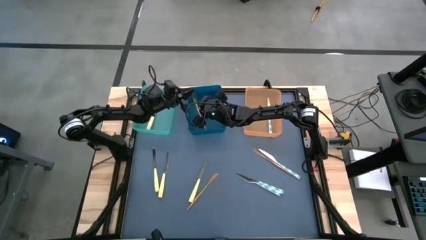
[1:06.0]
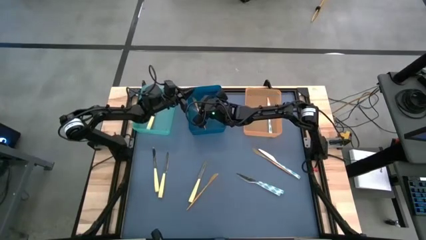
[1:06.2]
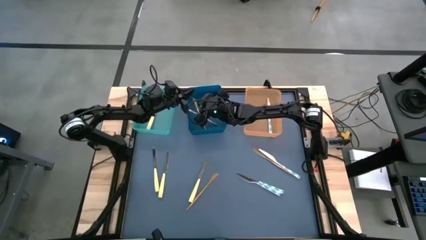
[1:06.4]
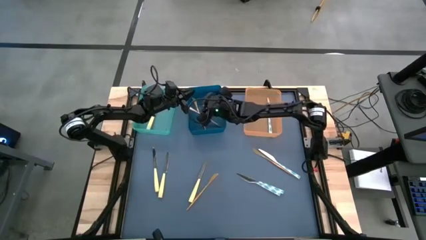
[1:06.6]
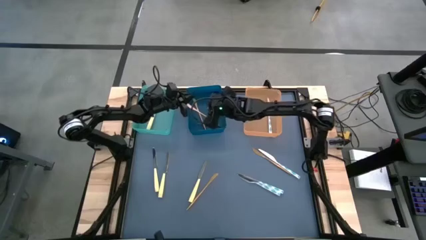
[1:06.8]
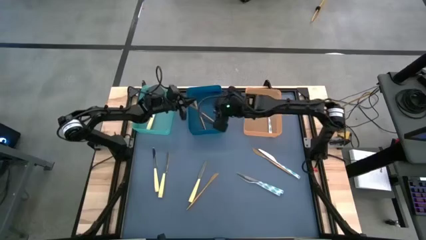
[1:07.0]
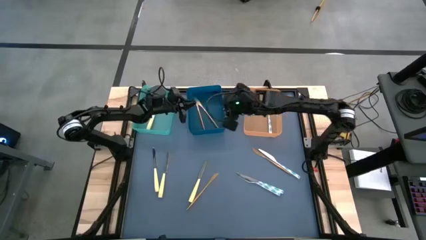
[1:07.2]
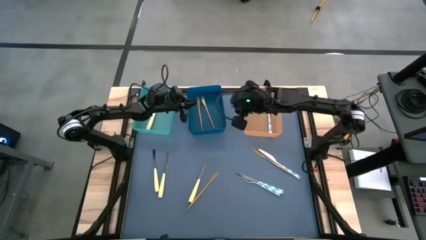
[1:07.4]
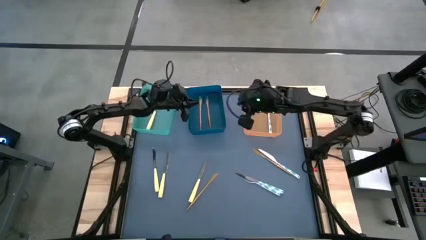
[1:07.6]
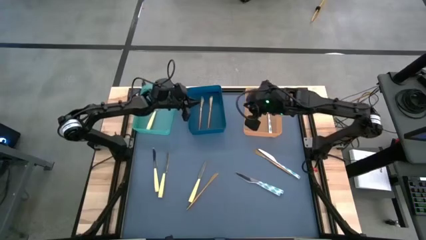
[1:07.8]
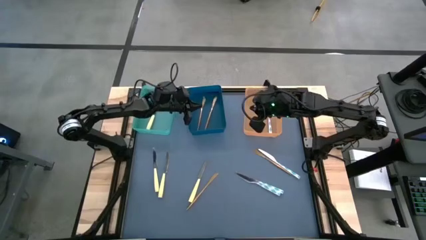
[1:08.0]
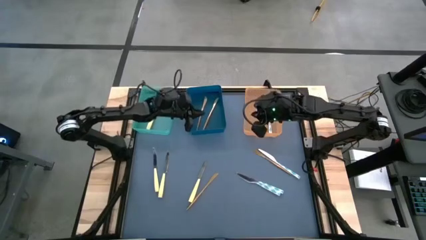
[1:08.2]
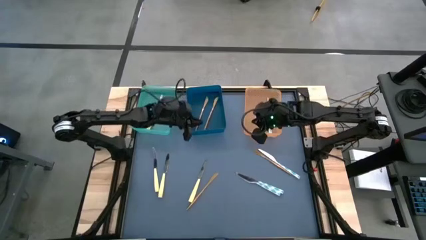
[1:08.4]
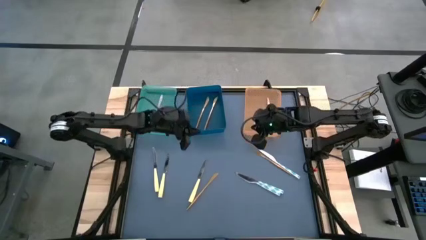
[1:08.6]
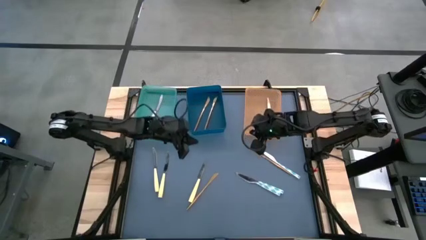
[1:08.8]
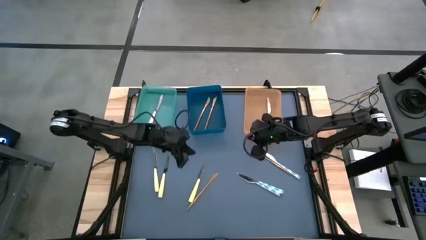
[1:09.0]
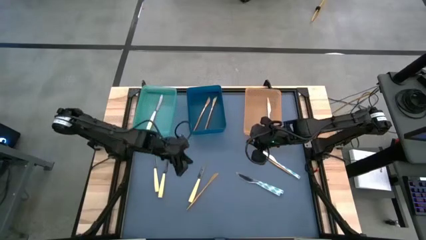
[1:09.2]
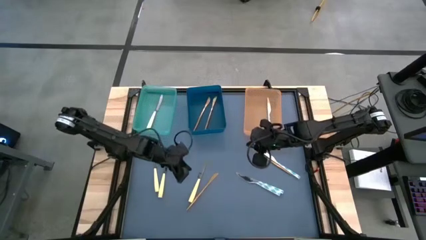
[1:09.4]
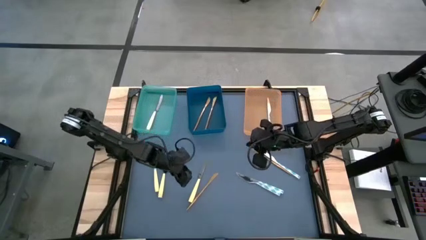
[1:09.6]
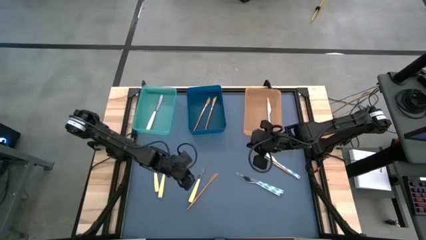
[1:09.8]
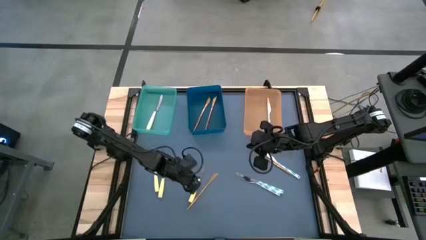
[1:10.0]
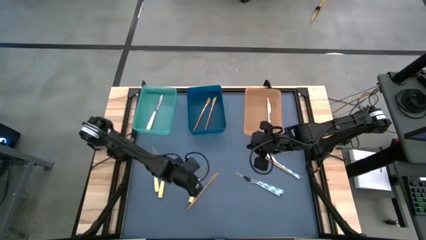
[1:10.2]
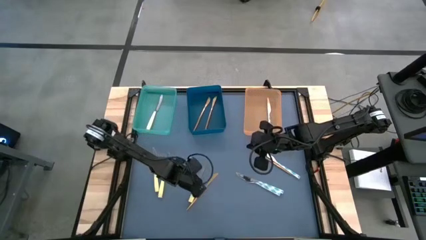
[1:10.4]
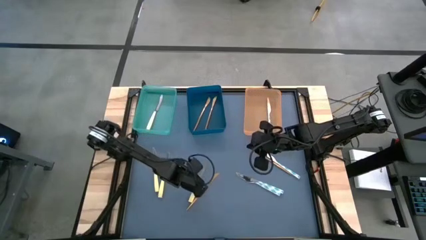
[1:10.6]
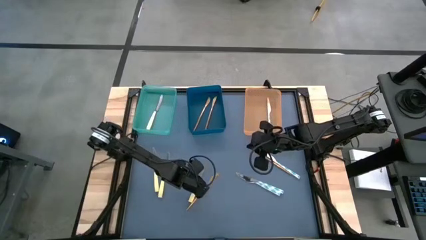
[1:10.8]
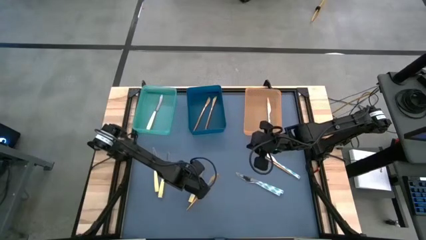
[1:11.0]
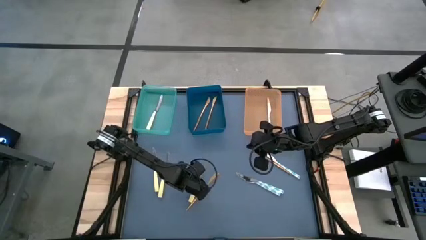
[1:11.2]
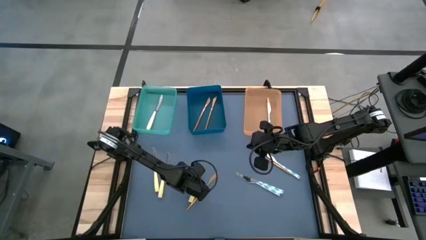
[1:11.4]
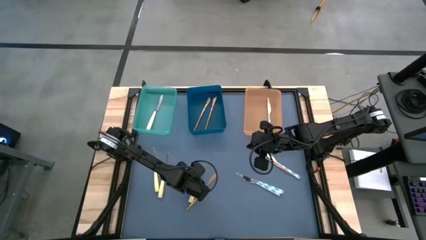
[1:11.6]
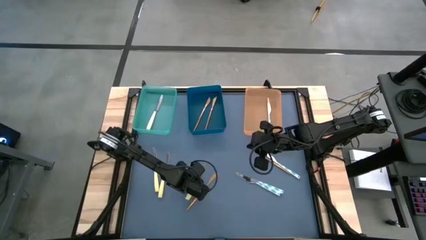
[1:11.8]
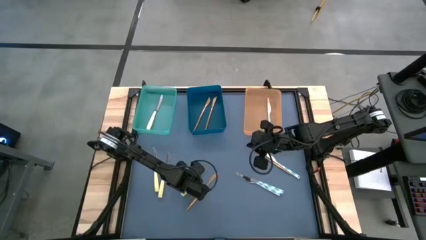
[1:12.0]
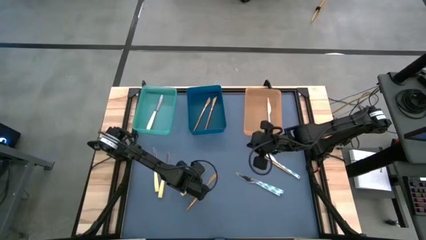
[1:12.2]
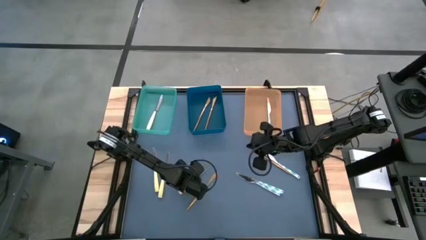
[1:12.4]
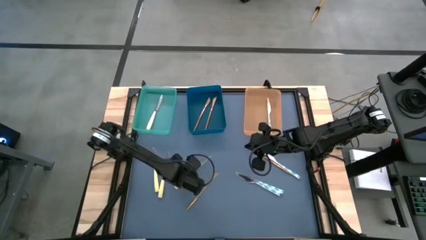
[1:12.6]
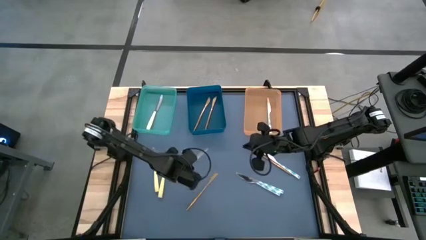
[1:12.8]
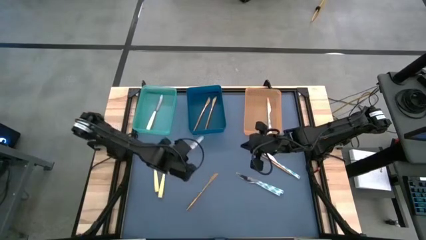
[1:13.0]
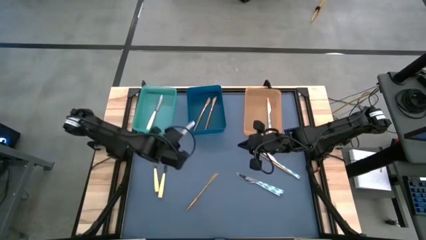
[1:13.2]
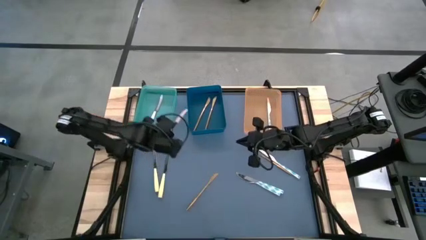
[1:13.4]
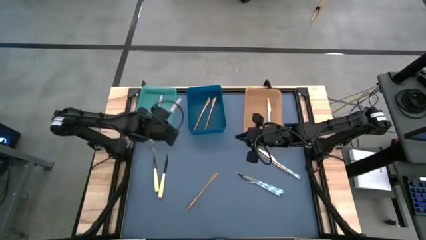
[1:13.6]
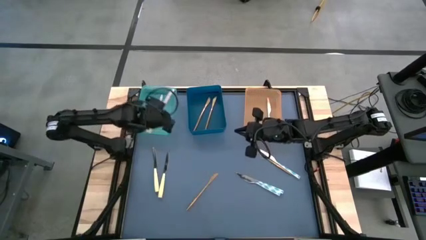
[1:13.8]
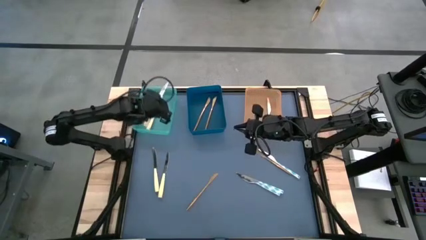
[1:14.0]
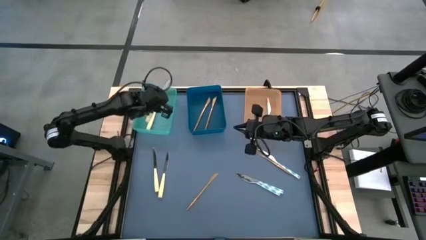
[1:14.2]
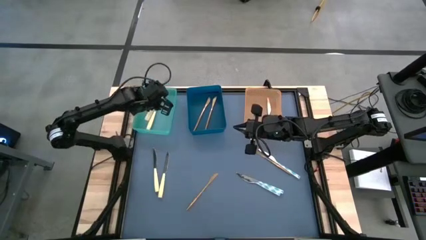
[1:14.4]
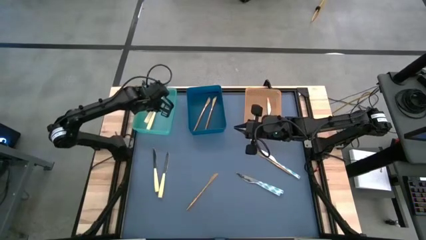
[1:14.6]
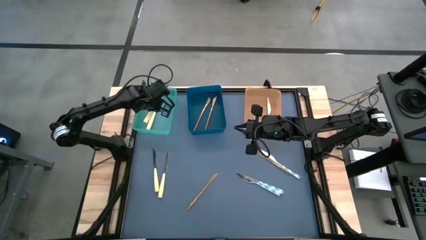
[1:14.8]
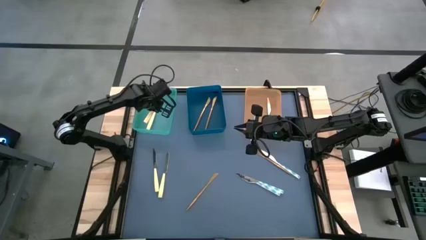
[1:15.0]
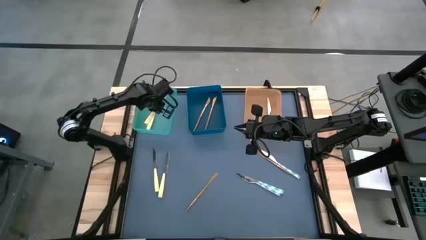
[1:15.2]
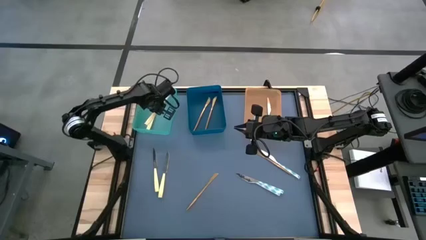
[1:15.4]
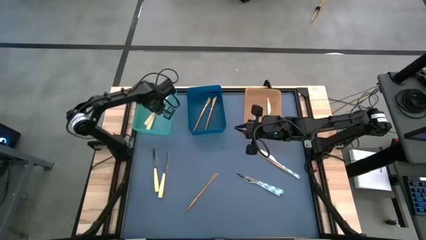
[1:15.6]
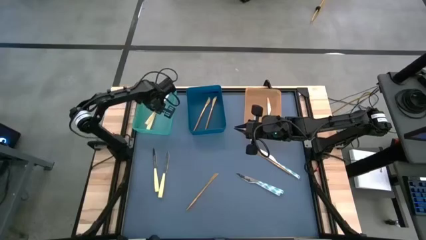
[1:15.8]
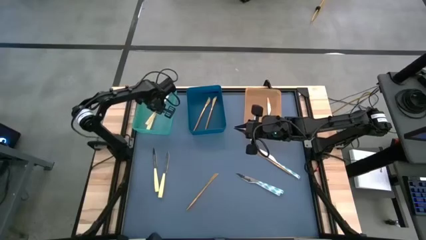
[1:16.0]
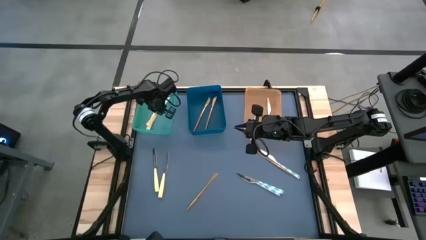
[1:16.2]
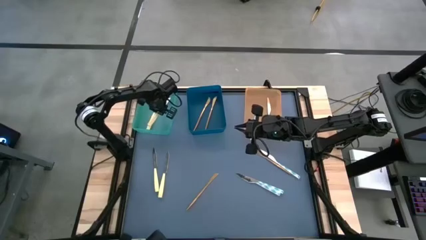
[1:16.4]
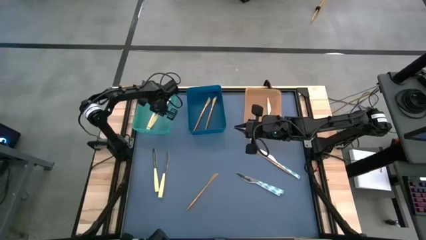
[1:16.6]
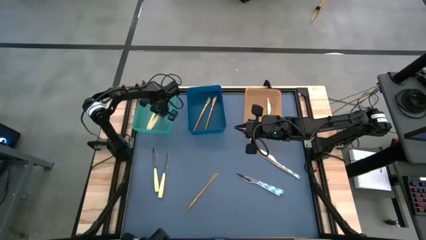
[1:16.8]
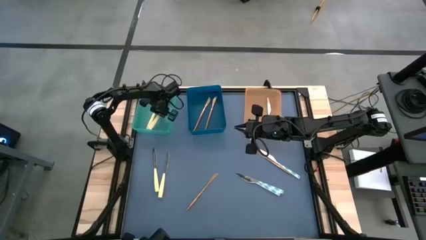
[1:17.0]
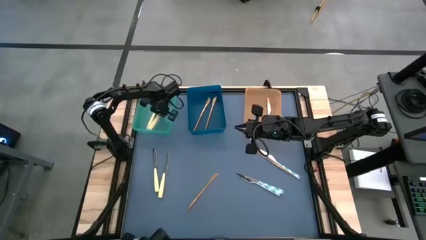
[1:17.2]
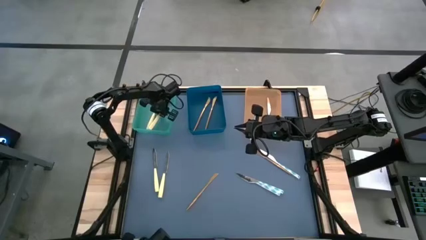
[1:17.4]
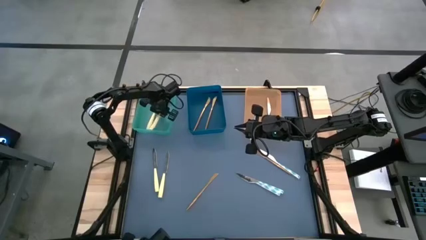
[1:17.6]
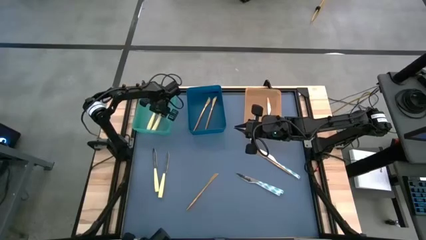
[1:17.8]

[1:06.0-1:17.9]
Task: Sort silverware by color (type)
Put the yellow knife into the green bin
